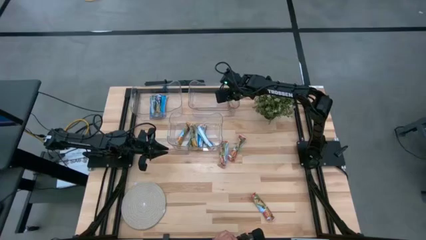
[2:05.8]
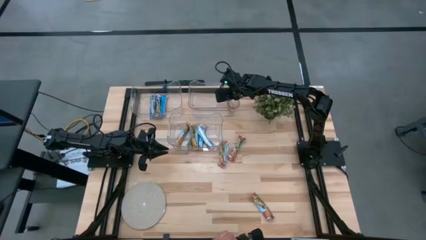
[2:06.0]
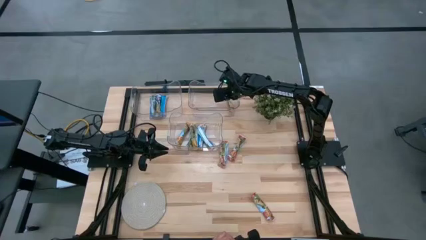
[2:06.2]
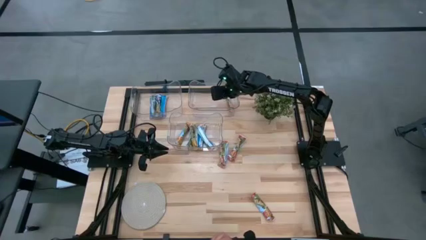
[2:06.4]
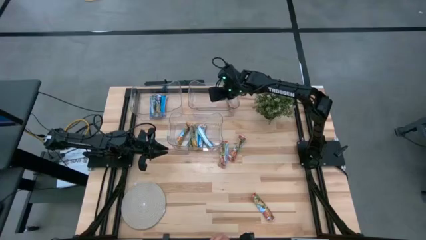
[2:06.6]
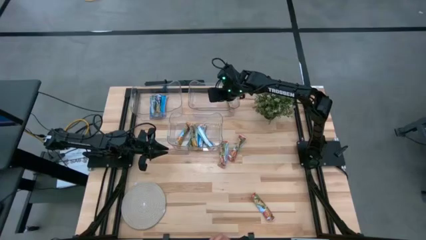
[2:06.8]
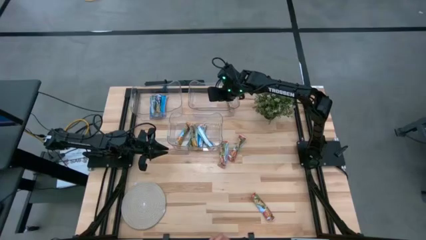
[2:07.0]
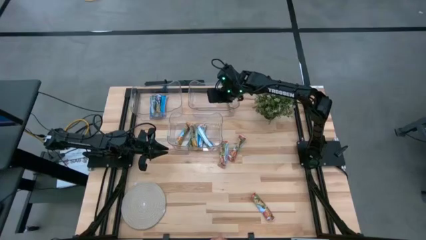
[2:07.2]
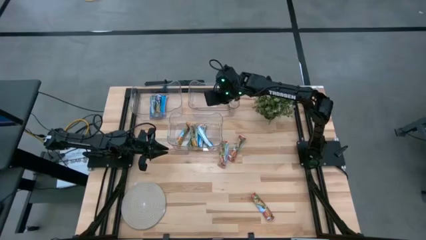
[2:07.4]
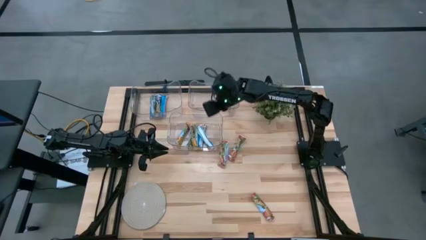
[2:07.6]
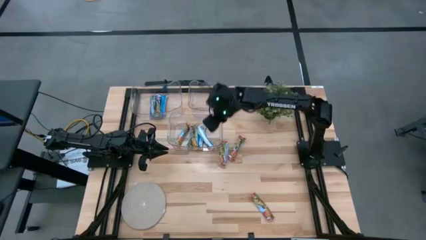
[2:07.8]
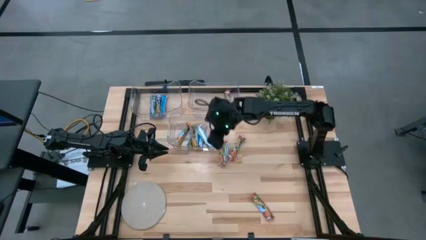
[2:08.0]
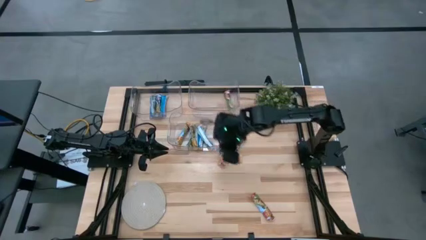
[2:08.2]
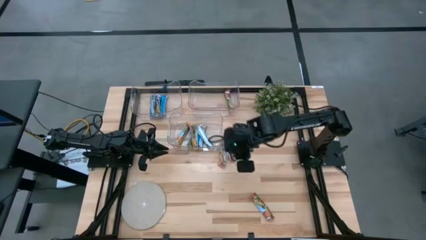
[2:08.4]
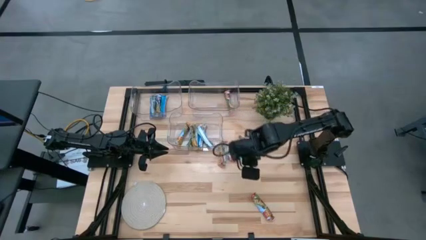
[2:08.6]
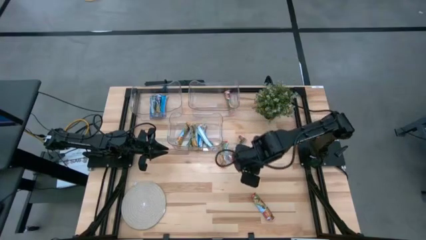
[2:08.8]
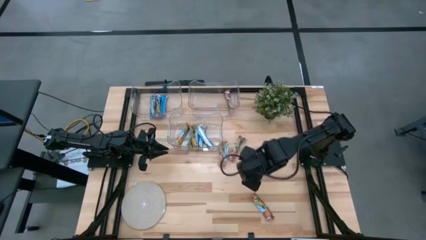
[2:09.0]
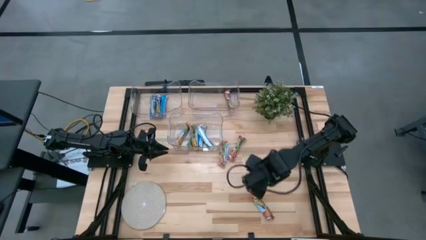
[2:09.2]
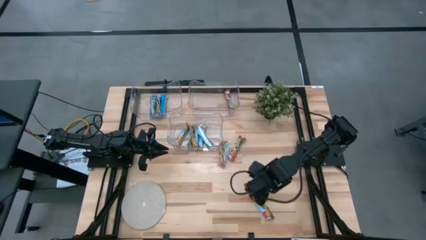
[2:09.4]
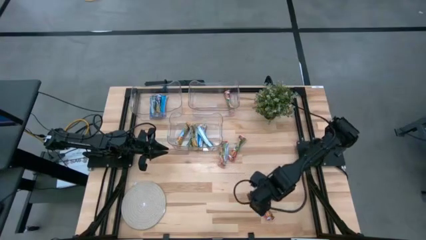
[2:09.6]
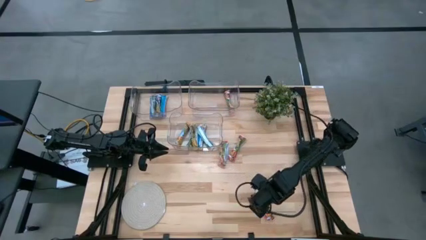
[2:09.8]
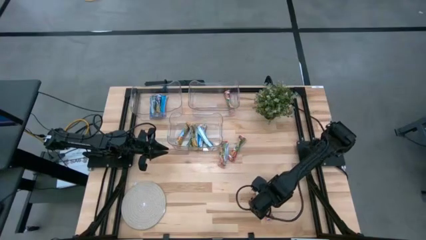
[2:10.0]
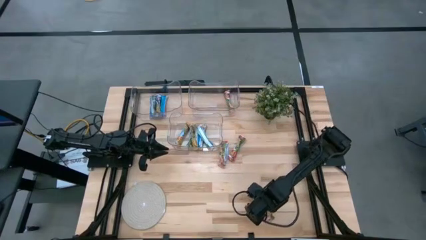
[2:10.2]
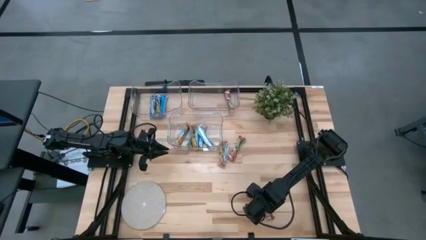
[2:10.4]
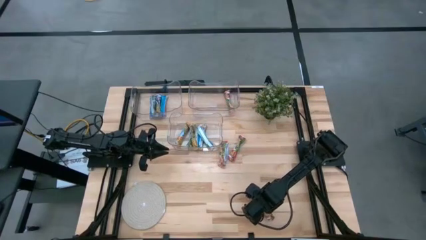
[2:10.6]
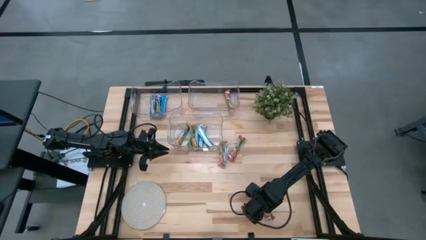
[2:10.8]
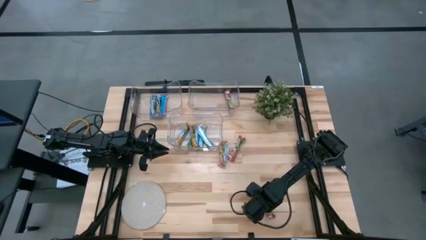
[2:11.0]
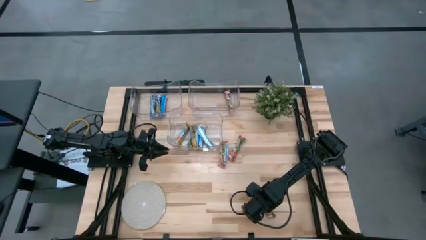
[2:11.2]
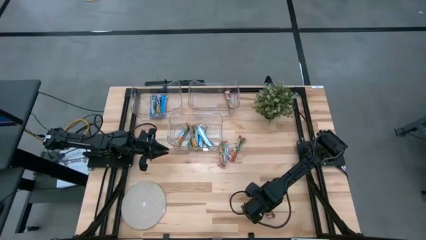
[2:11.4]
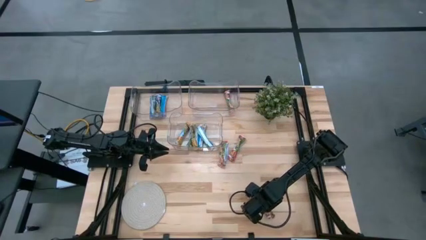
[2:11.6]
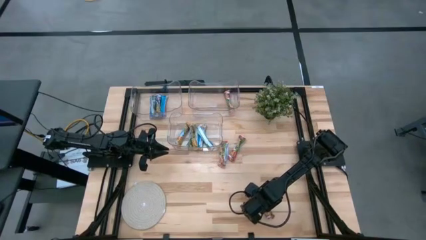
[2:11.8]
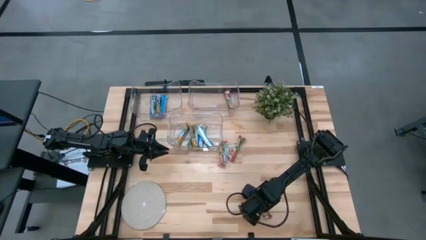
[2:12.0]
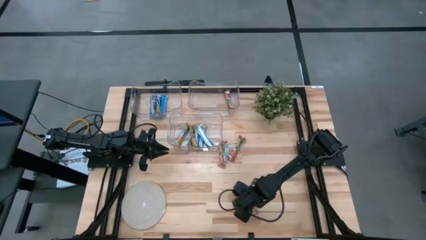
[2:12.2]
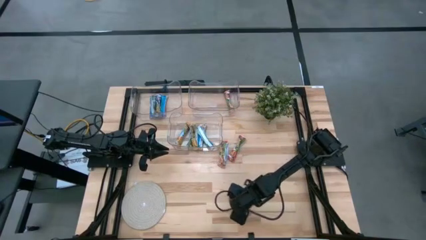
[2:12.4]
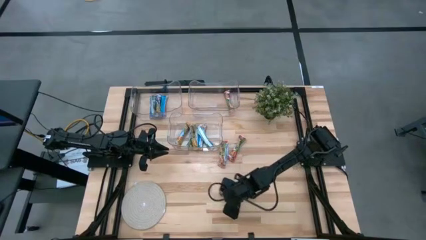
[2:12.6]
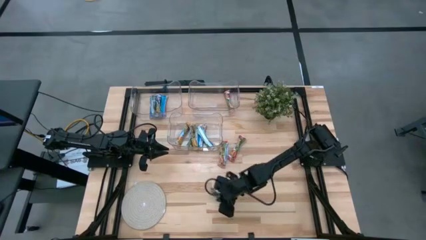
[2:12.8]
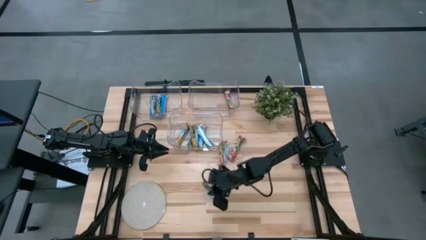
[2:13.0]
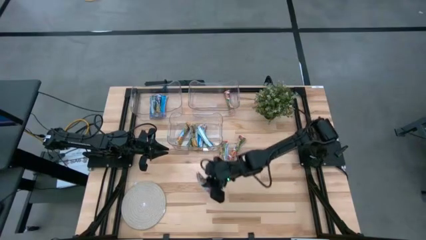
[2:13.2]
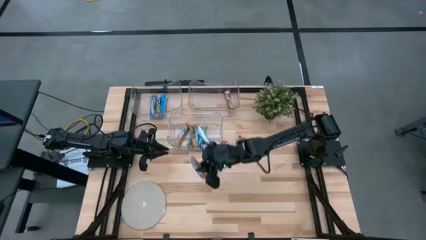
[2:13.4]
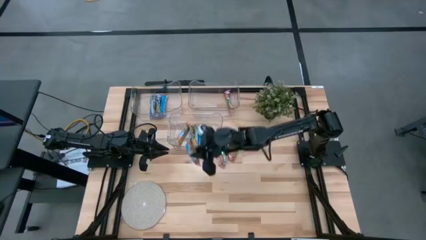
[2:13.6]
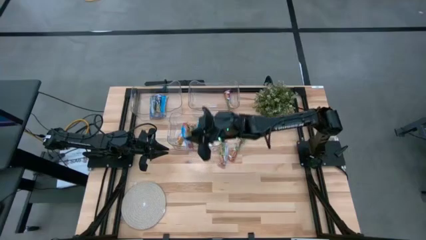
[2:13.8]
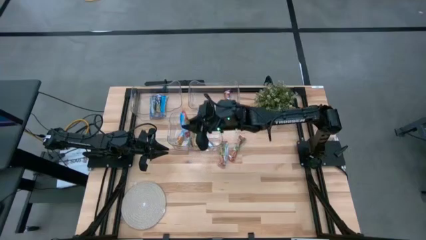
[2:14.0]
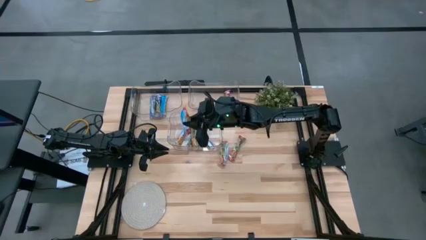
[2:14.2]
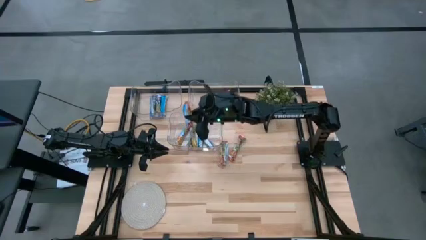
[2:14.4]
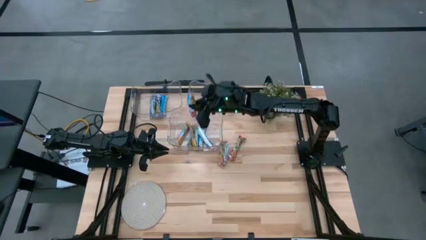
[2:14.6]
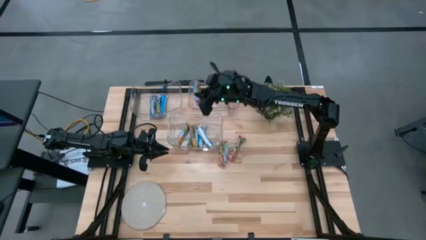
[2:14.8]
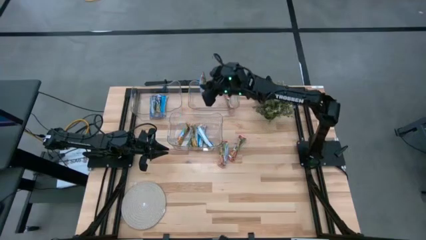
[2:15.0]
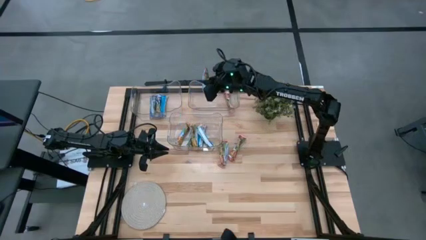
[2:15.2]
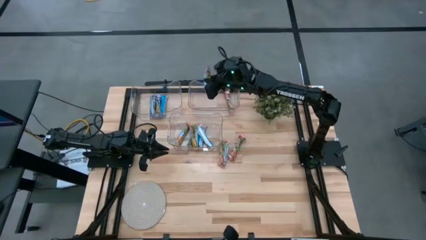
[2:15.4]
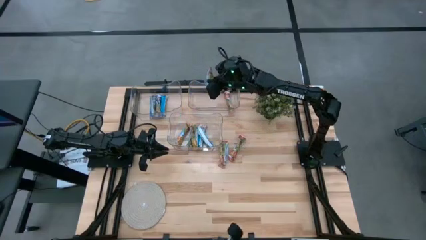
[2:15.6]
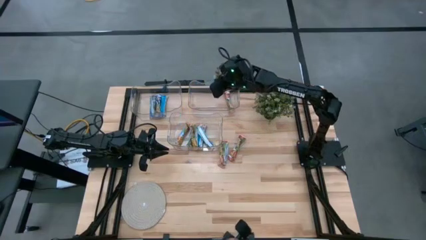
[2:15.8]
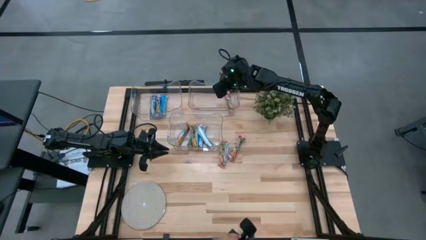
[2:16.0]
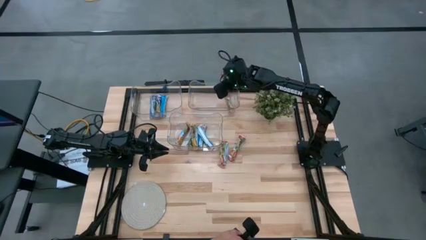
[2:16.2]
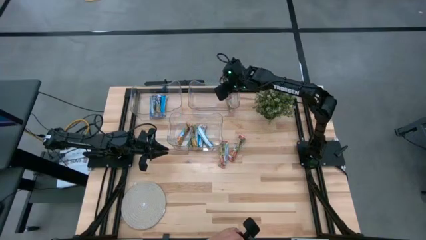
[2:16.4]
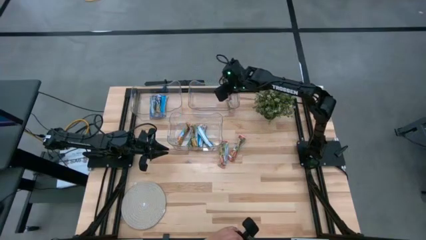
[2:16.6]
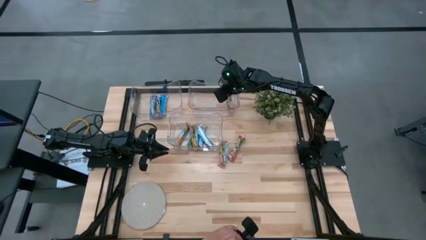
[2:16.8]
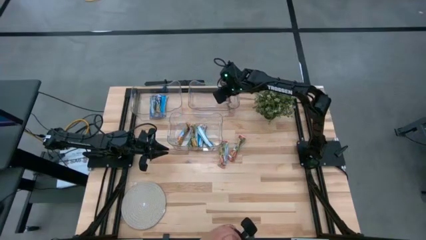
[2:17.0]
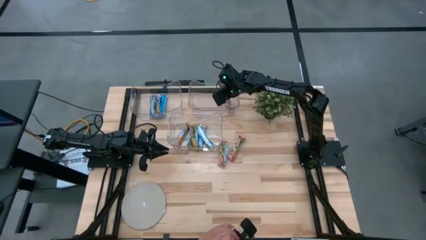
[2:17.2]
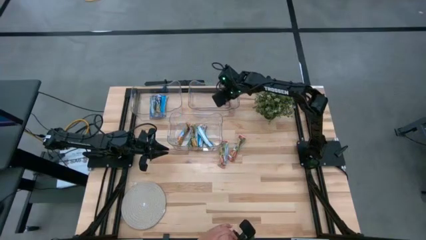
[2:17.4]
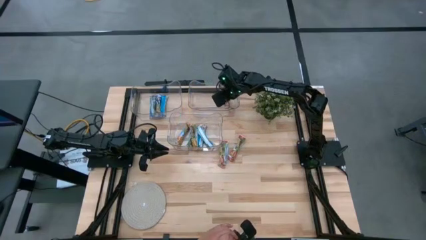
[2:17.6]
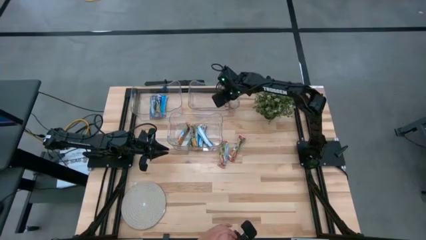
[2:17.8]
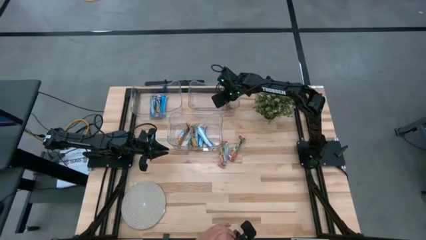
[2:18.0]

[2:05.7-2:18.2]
Task: Pick and place Granola Bars by type
Put the red granola bar into the top right transparent bin
